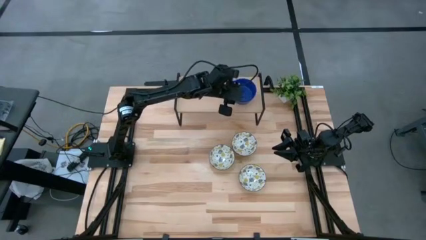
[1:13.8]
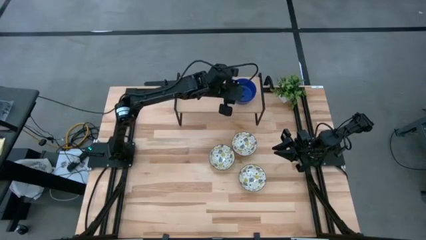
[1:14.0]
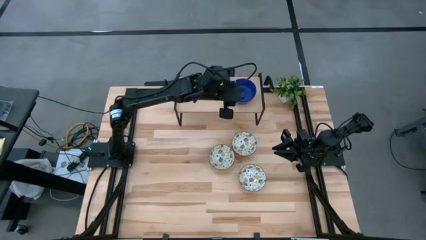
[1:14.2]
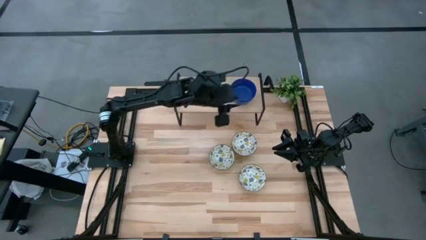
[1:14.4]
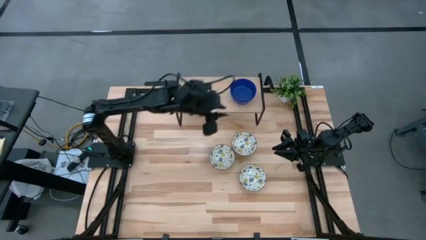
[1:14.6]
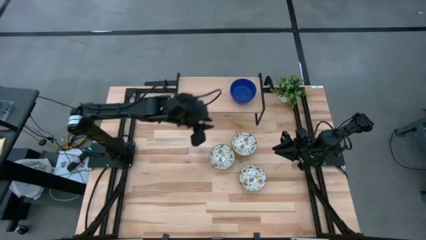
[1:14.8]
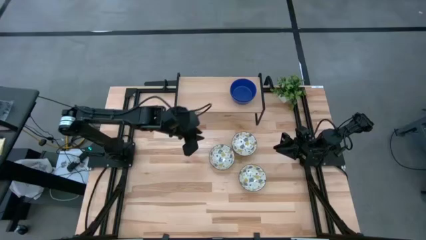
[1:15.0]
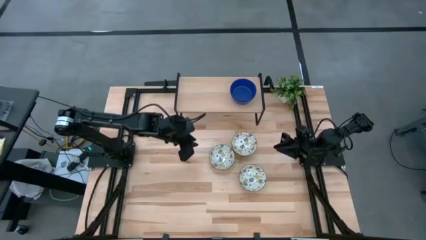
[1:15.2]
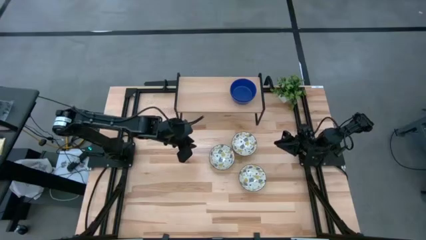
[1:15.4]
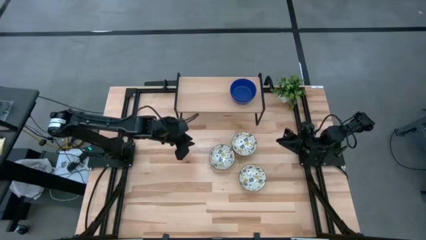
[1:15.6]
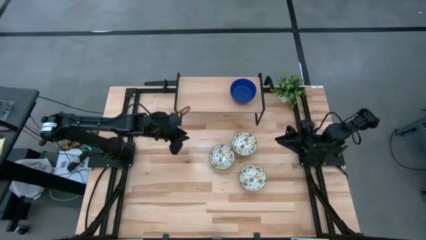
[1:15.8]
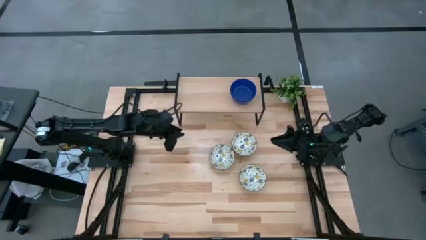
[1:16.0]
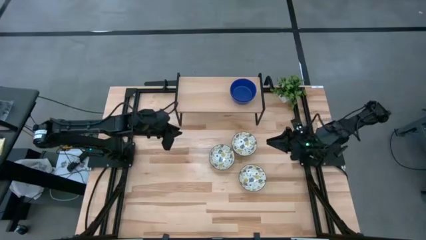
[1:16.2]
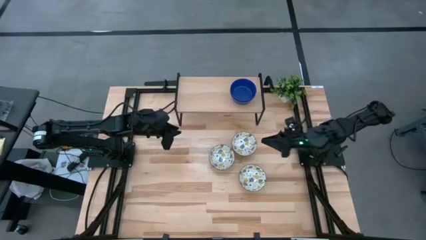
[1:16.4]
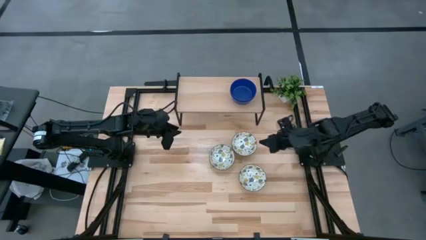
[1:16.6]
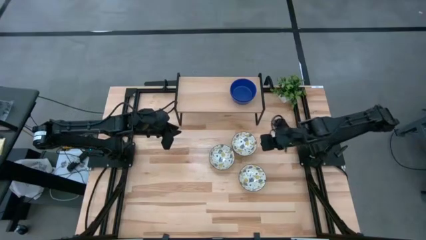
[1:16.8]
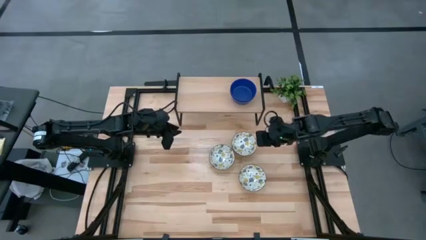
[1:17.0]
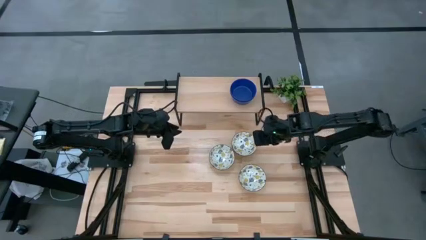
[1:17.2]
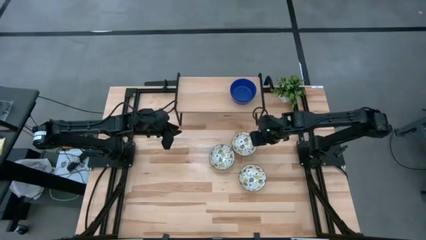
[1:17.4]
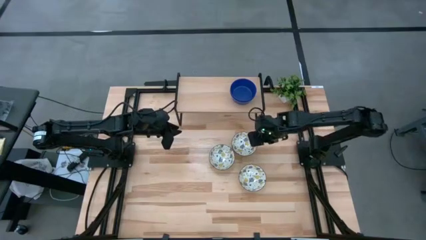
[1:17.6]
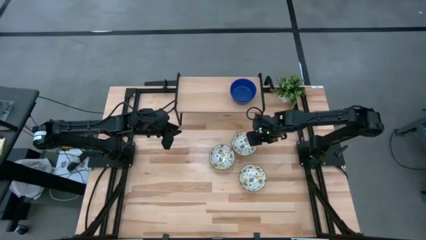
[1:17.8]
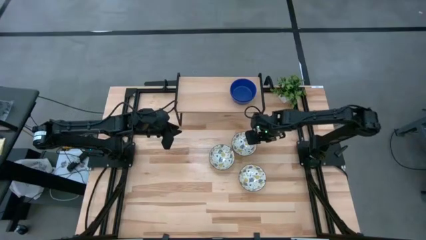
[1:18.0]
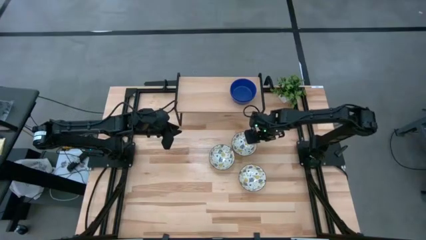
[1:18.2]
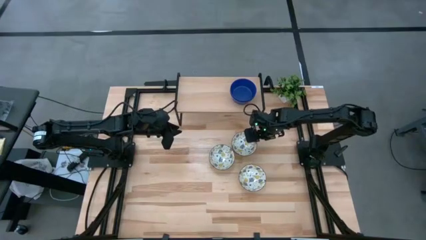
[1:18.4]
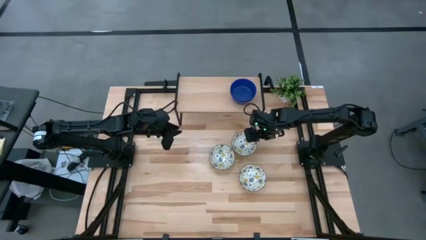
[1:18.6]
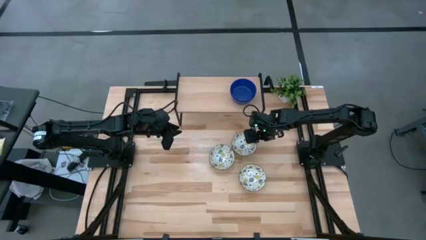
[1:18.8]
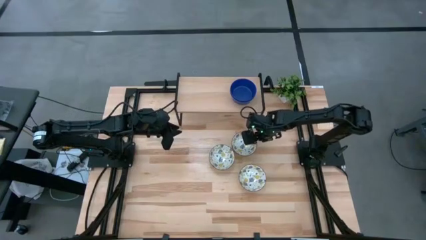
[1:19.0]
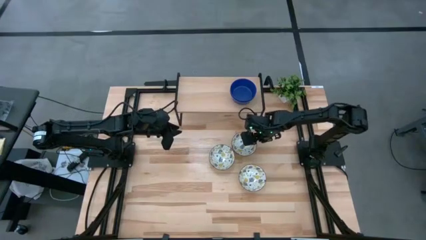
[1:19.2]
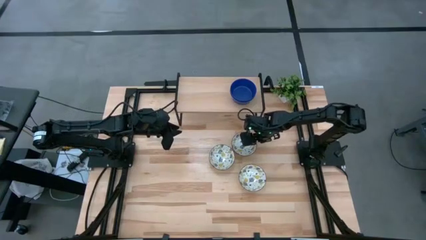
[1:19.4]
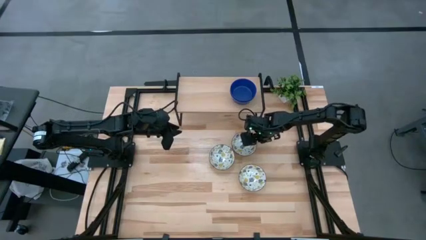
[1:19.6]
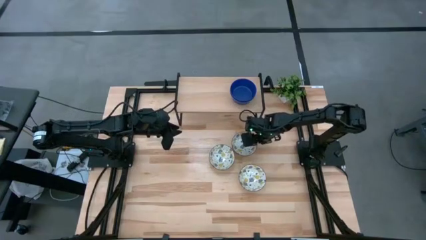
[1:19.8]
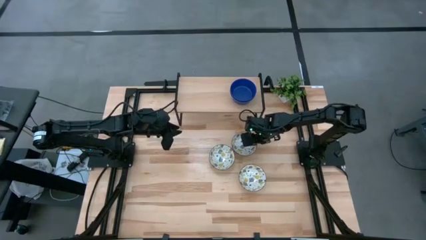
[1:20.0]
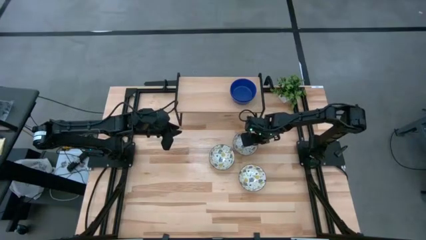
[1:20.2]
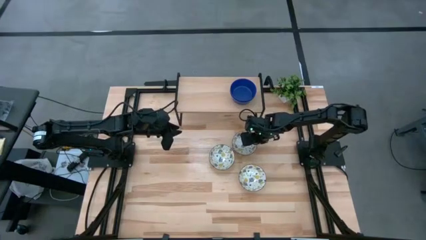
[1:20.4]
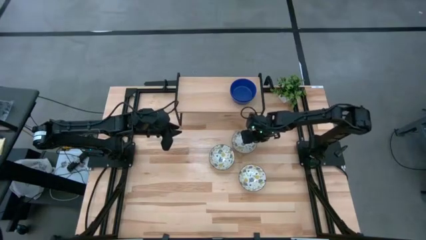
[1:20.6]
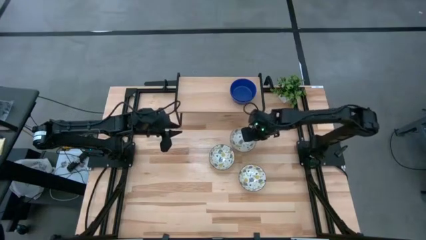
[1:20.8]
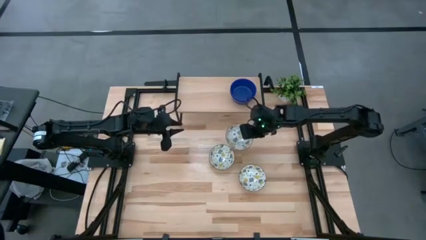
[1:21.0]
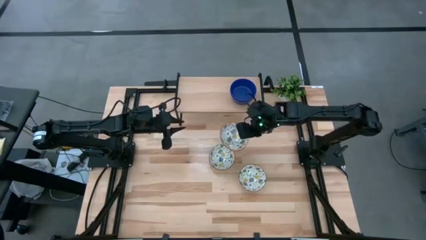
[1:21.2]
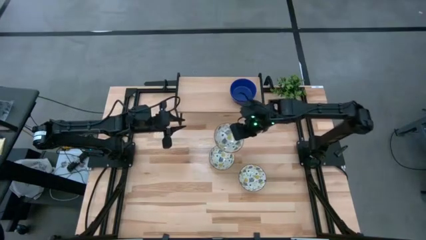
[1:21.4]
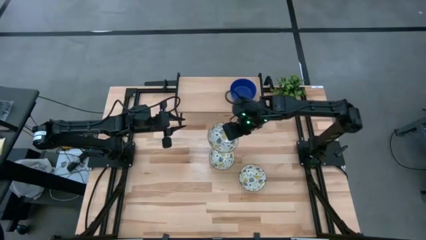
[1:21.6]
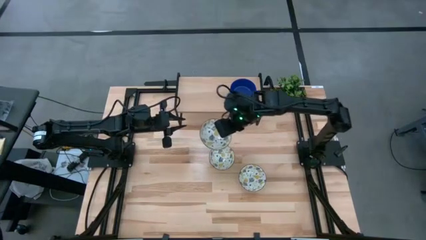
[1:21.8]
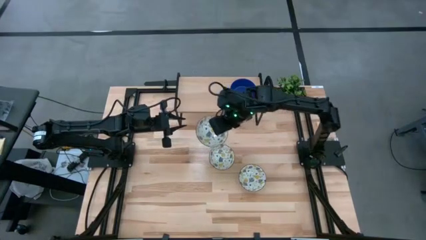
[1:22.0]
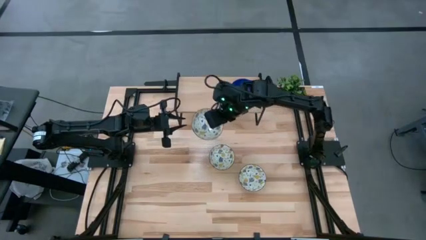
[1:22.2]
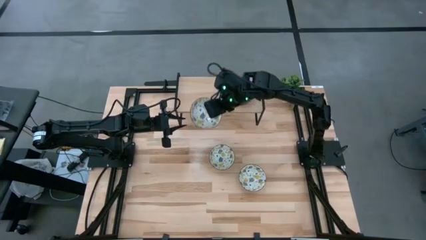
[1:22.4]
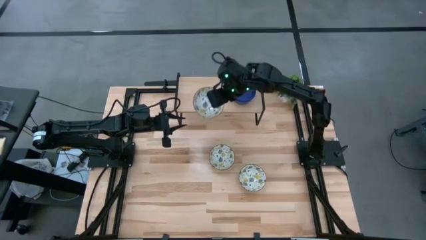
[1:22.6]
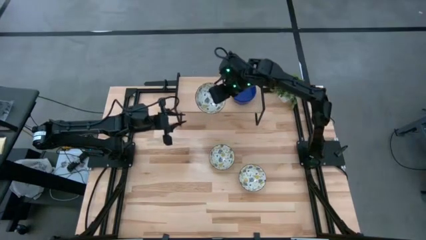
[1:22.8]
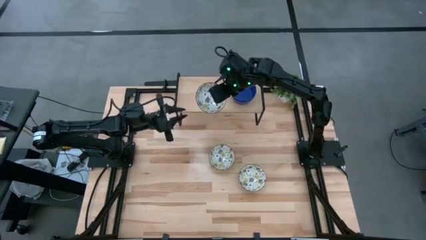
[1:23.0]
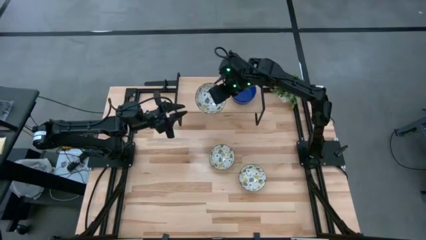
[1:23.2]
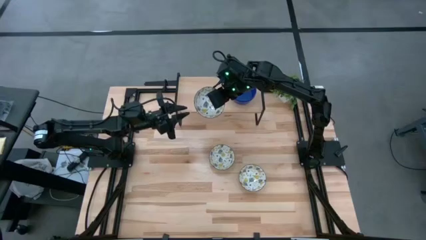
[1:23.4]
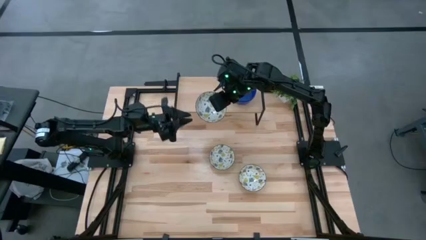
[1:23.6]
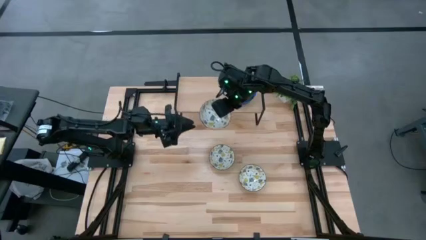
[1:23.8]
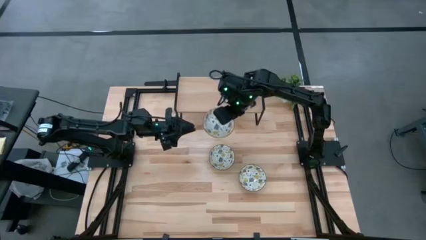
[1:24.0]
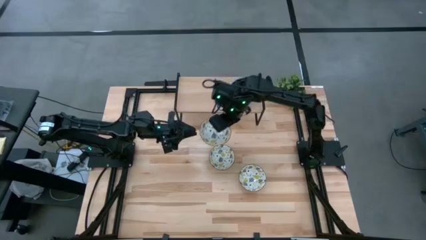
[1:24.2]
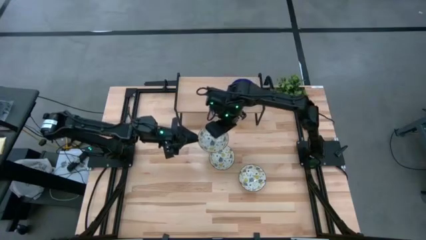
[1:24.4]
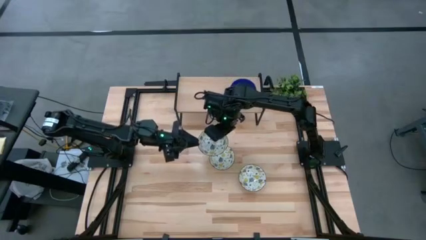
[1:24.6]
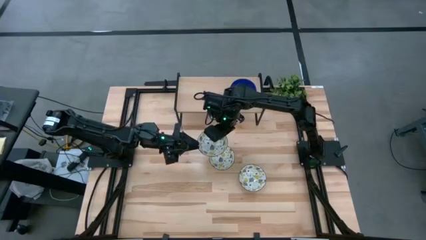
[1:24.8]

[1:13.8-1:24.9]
Task: Pick & Place Mini bowls
Put the top white patterned bowl on the shelf

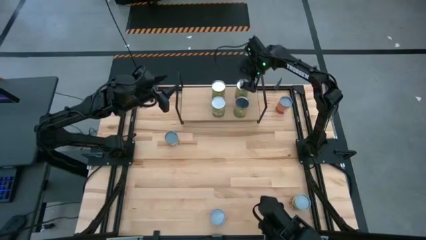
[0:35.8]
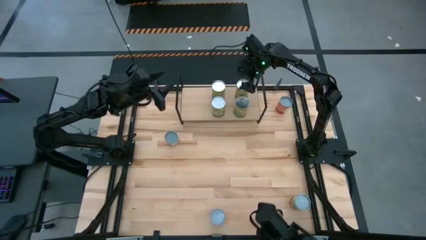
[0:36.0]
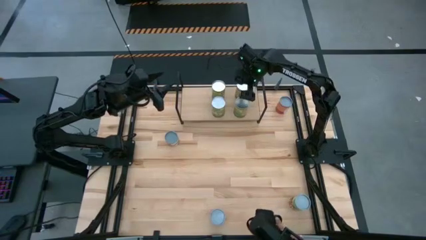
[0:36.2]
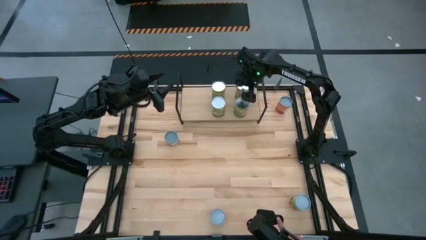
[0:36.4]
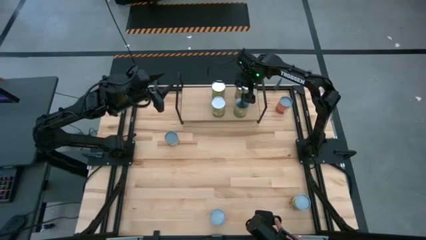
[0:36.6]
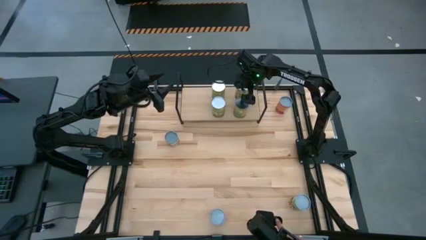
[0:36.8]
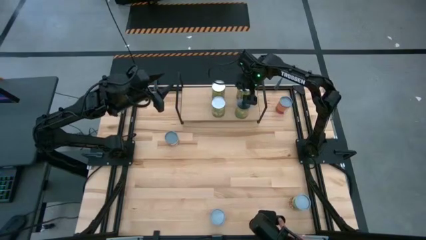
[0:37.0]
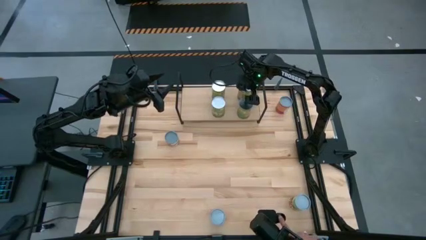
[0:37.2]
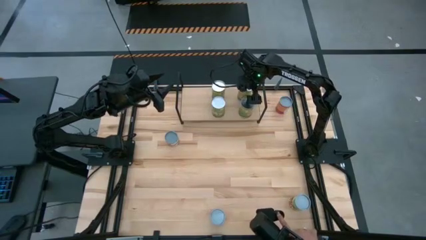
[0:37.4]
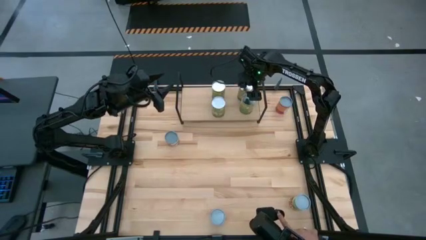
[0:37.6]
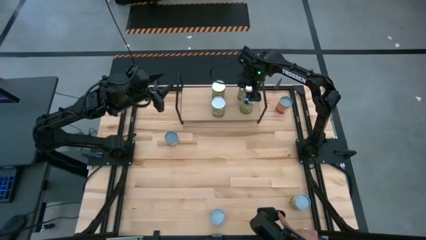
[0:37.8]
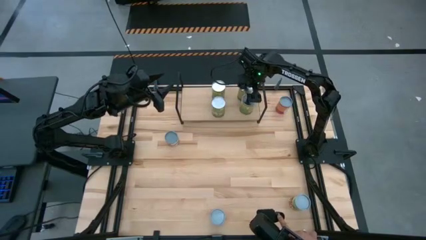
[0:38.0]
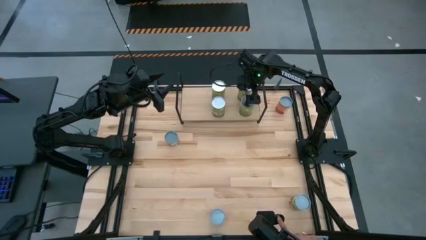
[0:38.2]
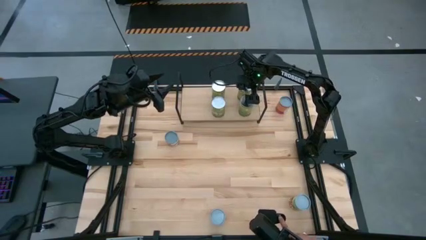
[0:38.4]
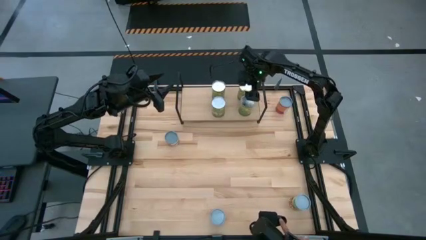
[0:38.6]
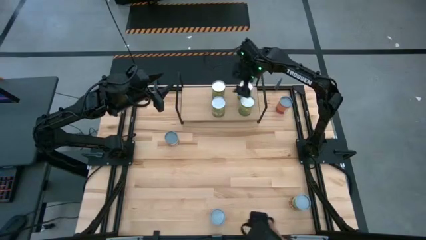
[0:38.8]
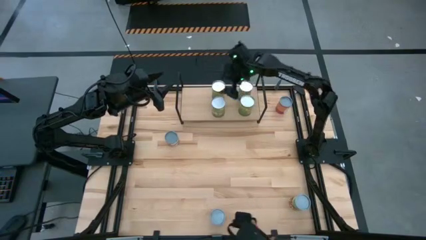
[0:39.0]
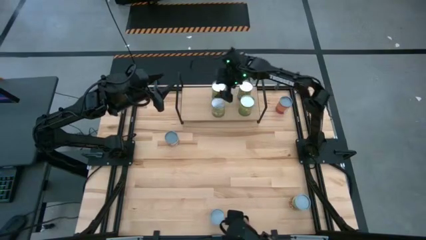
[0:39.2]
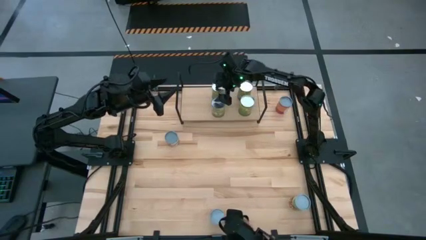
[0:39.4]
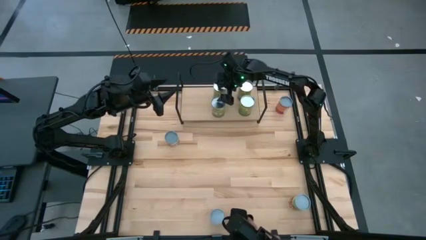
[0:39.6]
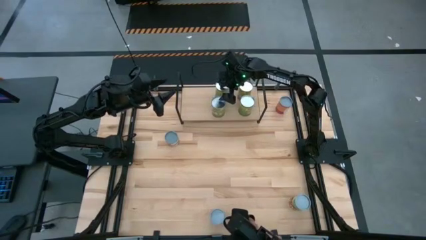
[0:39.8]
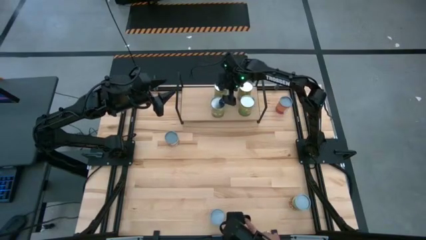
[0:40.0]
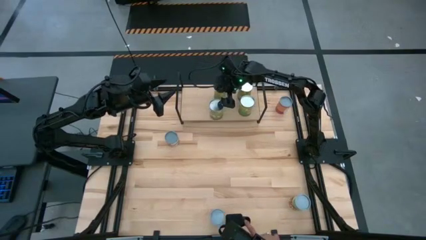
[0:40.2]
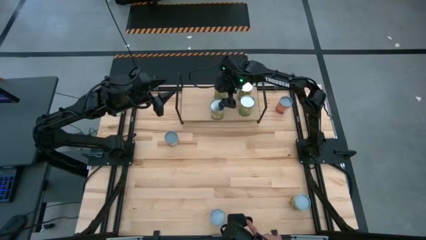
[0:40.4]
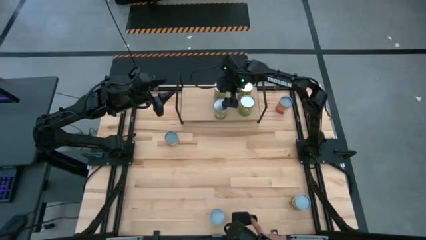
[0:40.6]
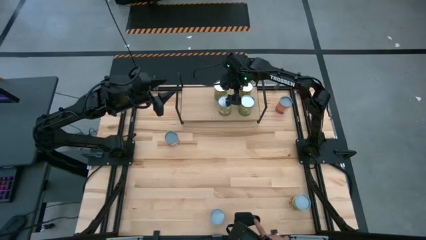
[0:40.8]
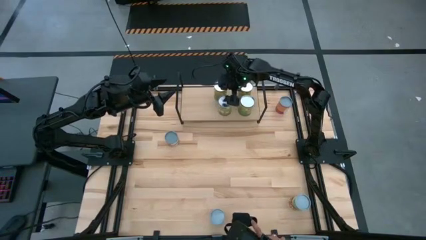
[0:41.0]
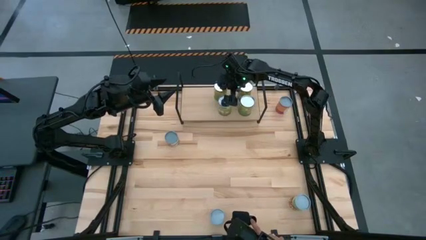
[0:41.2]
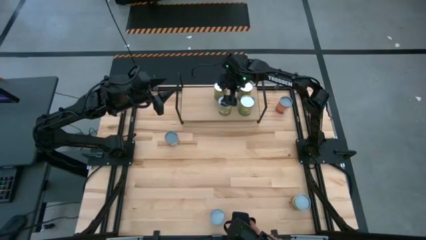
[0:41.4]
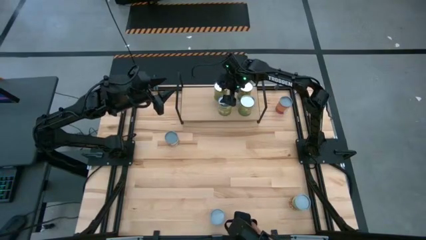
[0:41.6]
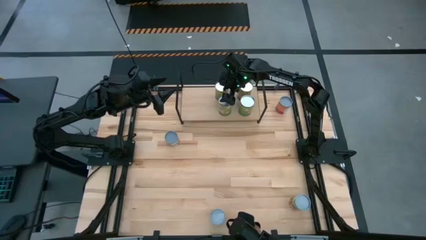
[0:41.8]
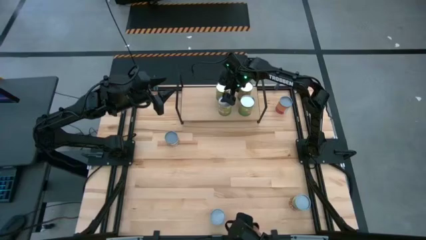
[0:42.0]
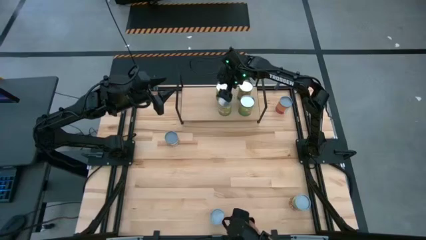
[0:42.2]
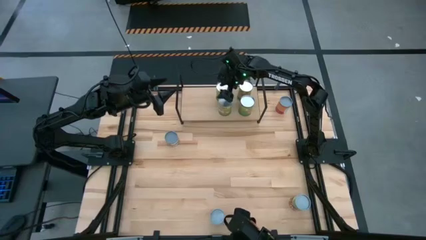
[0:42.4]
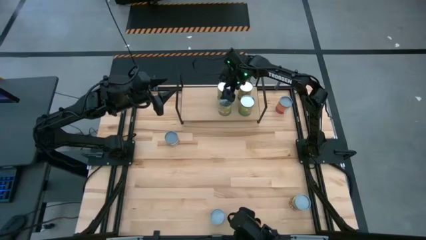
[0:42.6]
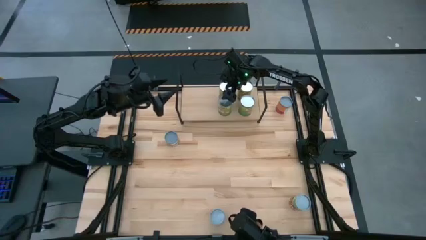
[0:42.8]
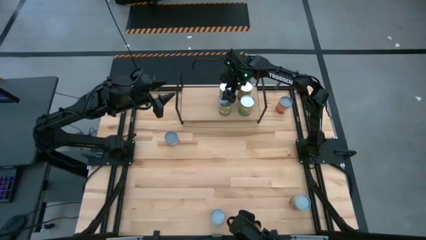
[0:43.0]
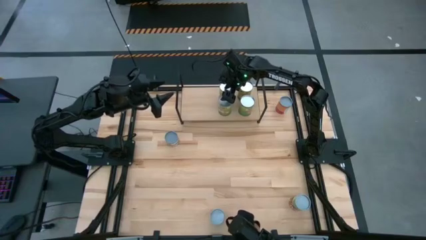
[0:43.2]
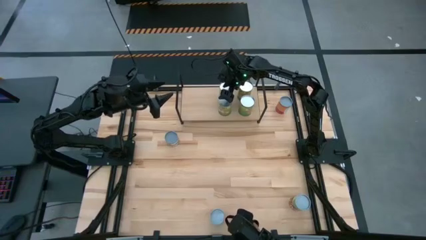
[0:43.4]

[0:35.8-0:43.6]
Task: Pick and place cans onto a shelf
Adjust the canned goods on the shelf
